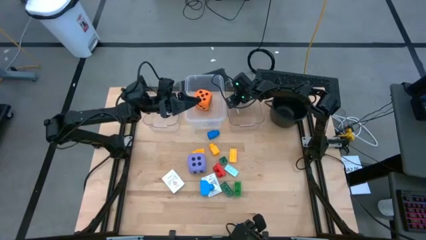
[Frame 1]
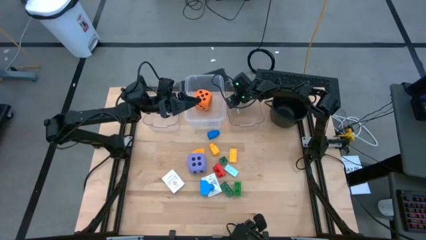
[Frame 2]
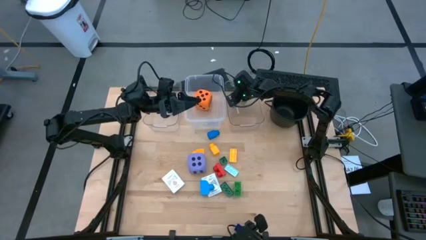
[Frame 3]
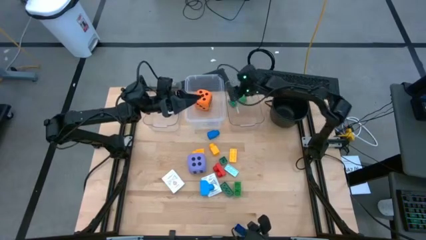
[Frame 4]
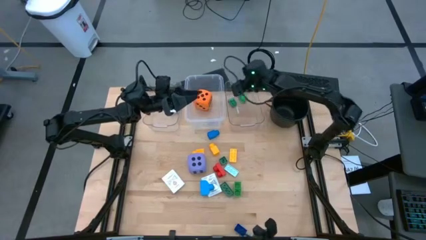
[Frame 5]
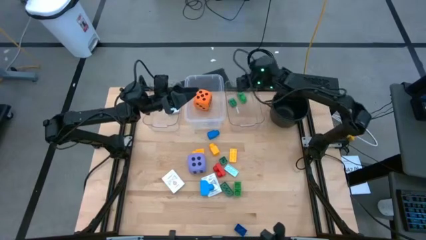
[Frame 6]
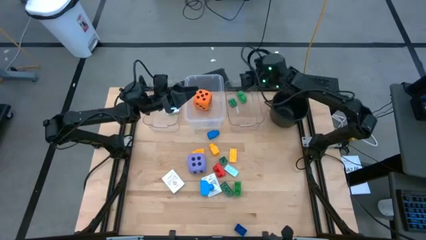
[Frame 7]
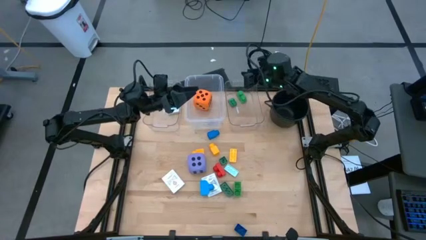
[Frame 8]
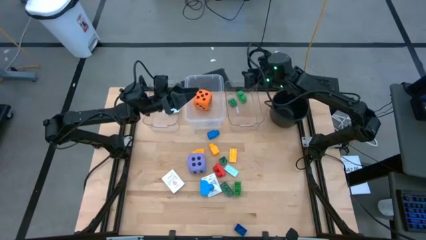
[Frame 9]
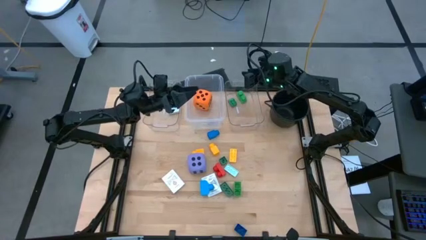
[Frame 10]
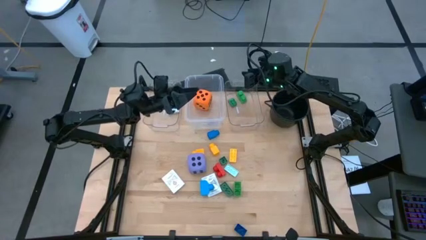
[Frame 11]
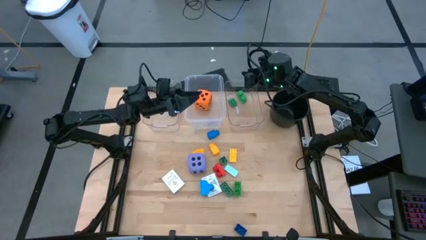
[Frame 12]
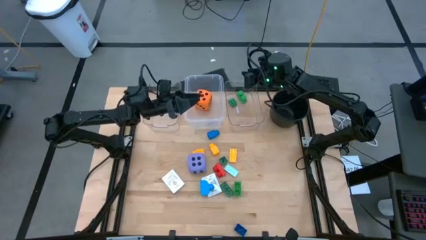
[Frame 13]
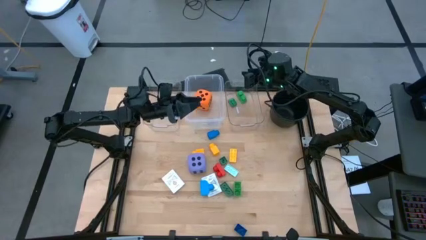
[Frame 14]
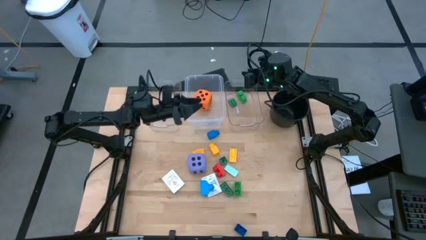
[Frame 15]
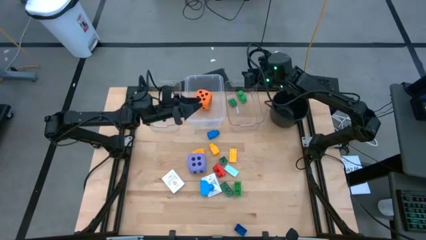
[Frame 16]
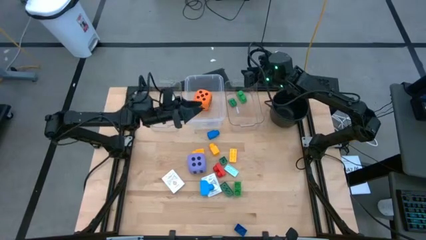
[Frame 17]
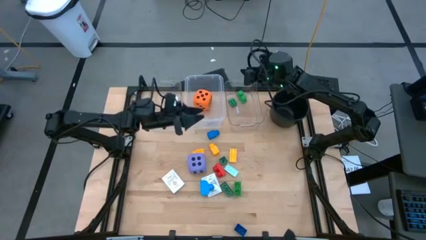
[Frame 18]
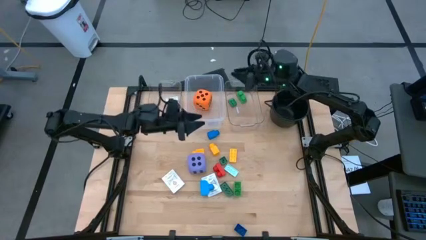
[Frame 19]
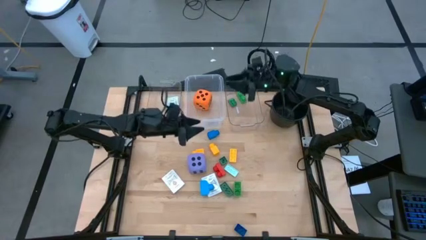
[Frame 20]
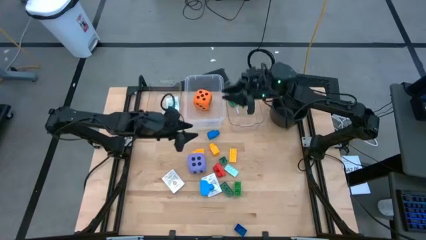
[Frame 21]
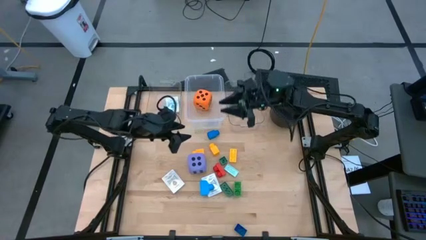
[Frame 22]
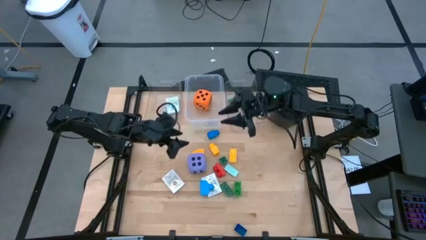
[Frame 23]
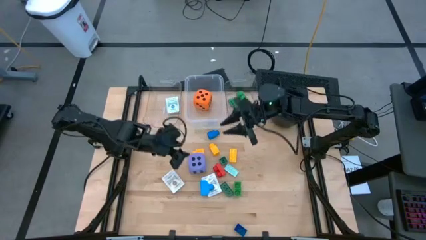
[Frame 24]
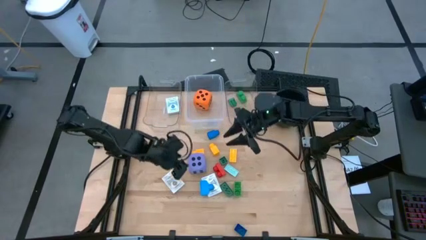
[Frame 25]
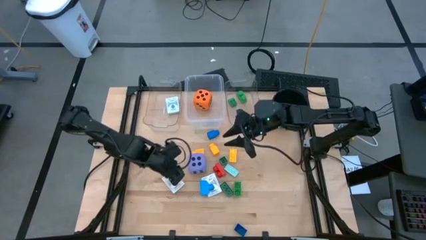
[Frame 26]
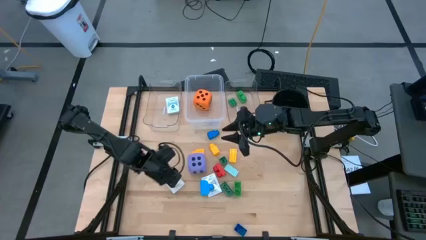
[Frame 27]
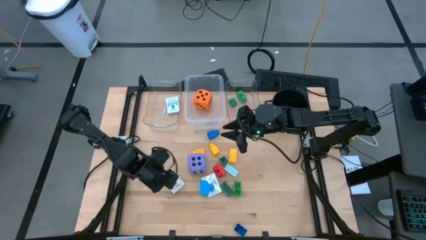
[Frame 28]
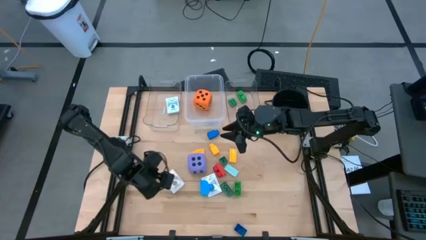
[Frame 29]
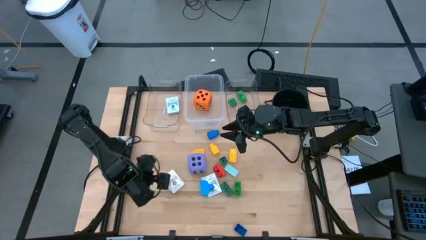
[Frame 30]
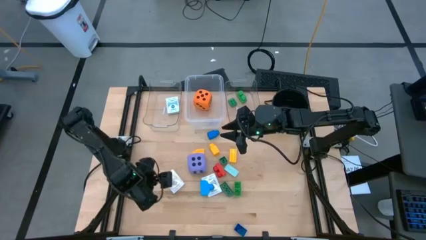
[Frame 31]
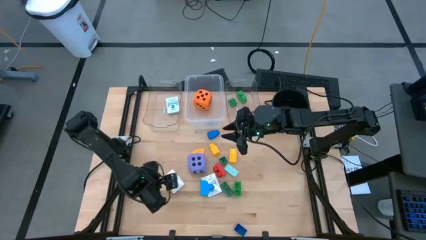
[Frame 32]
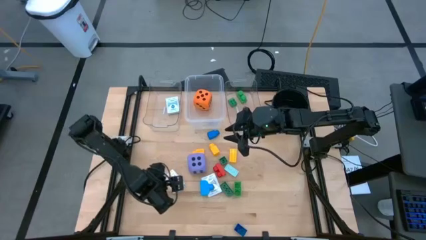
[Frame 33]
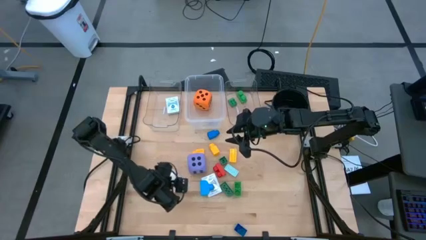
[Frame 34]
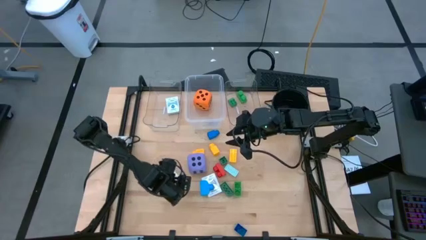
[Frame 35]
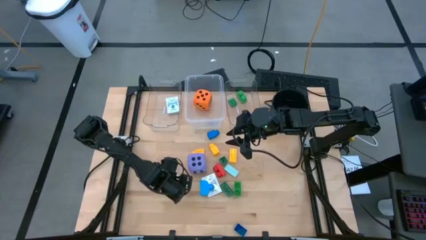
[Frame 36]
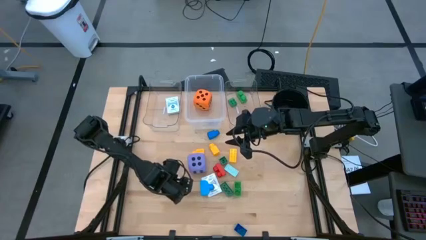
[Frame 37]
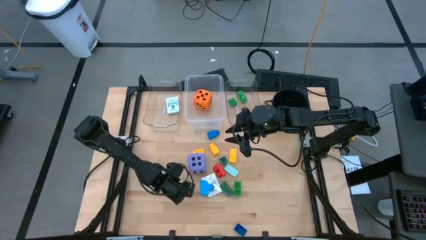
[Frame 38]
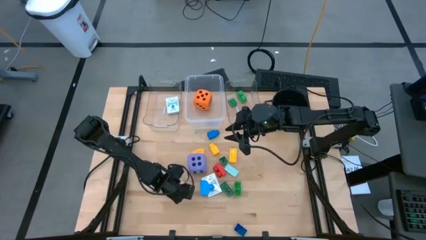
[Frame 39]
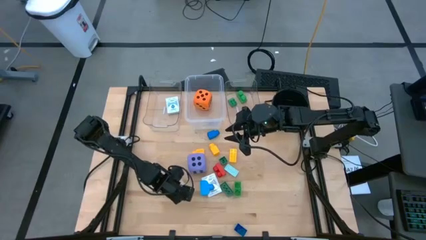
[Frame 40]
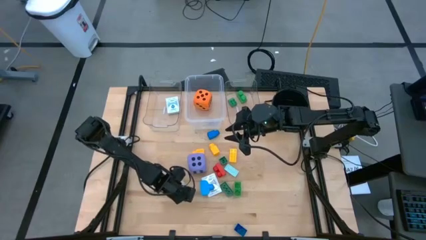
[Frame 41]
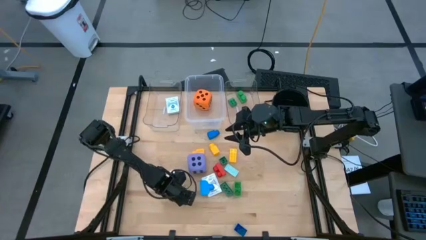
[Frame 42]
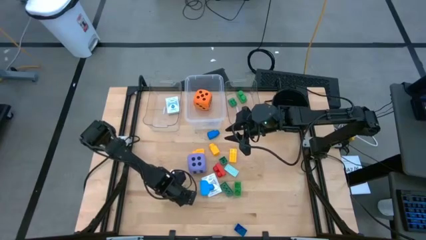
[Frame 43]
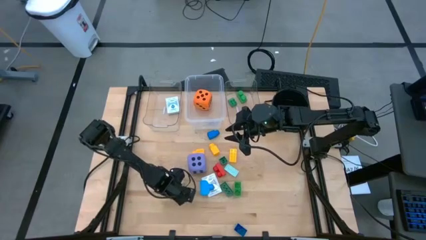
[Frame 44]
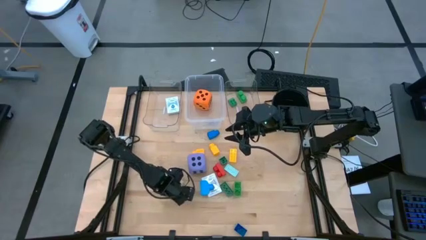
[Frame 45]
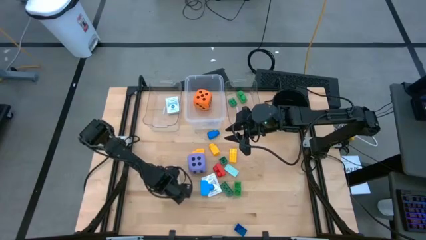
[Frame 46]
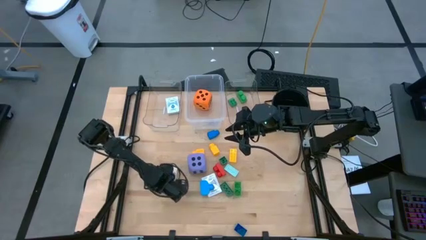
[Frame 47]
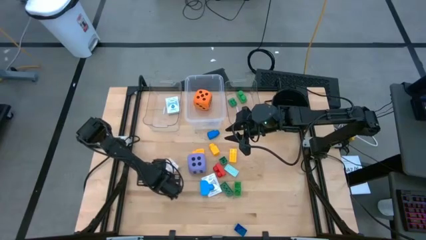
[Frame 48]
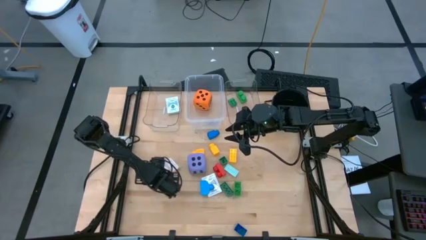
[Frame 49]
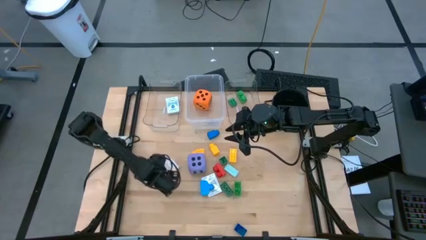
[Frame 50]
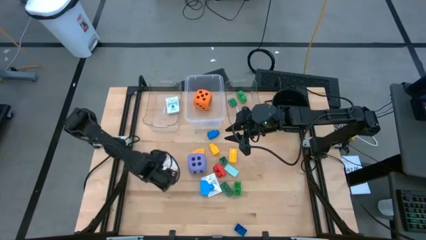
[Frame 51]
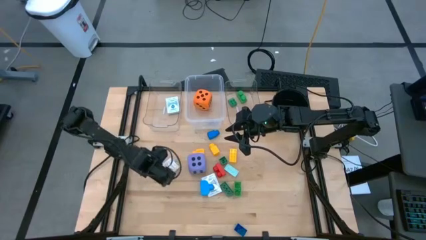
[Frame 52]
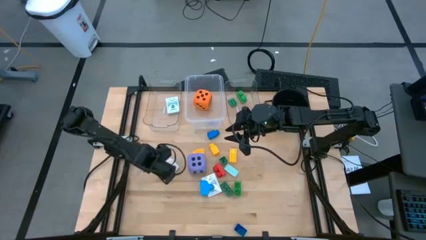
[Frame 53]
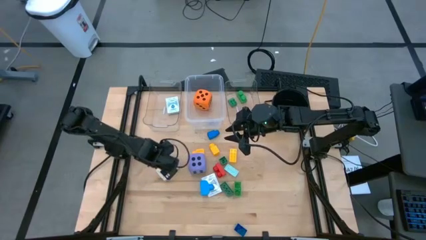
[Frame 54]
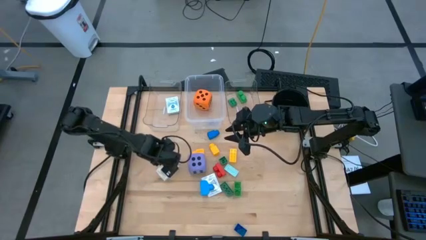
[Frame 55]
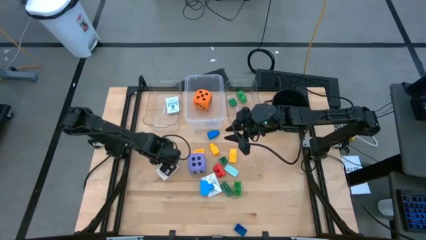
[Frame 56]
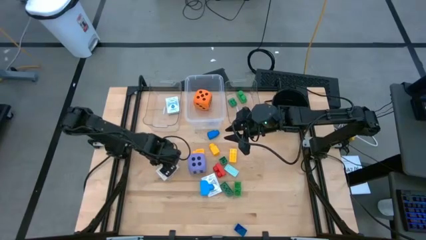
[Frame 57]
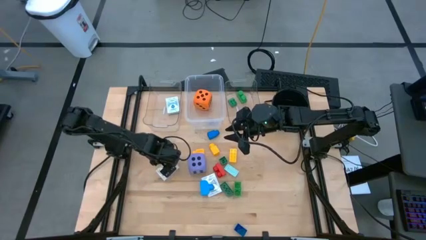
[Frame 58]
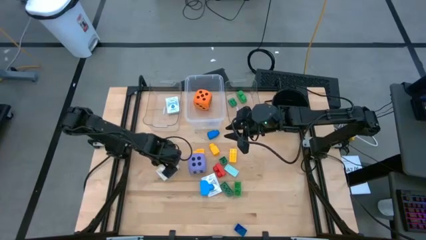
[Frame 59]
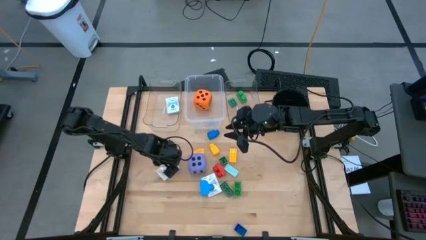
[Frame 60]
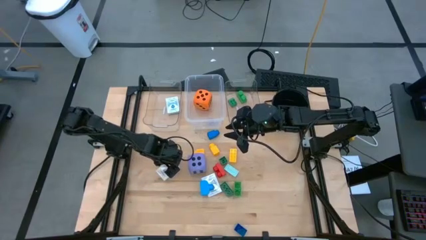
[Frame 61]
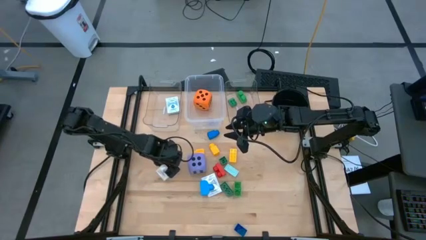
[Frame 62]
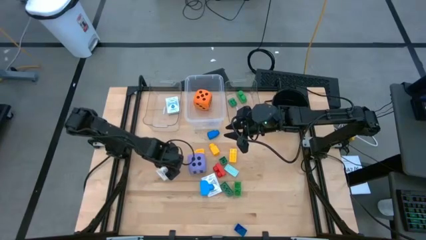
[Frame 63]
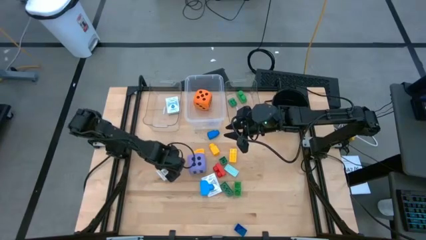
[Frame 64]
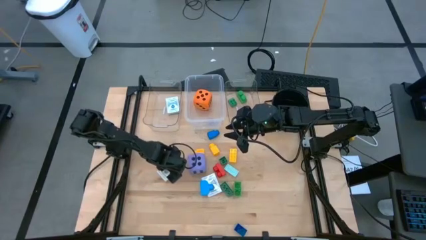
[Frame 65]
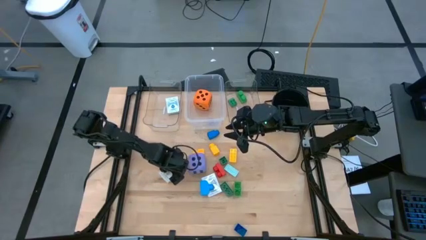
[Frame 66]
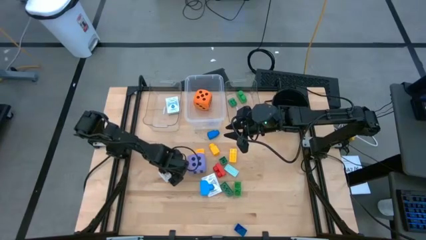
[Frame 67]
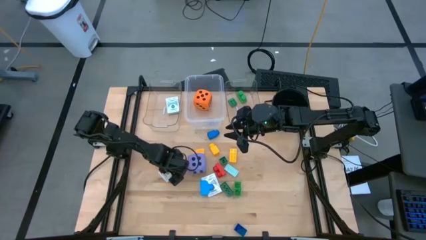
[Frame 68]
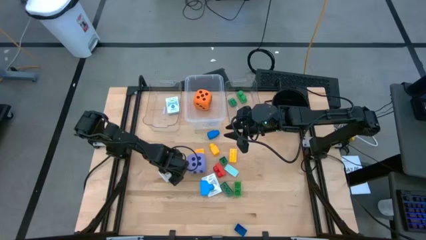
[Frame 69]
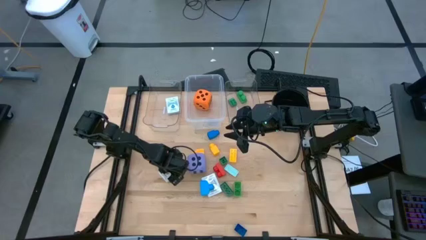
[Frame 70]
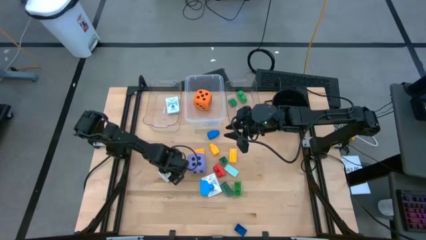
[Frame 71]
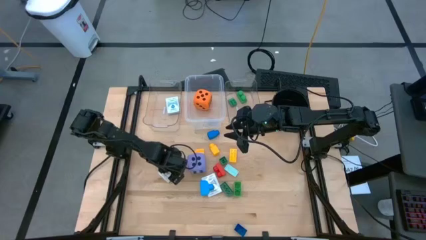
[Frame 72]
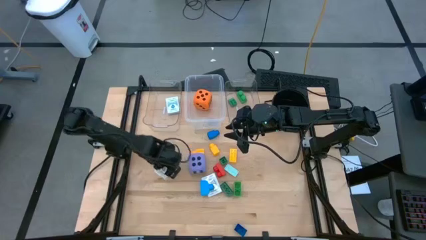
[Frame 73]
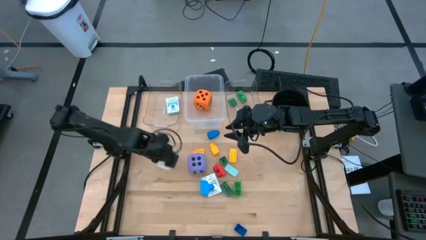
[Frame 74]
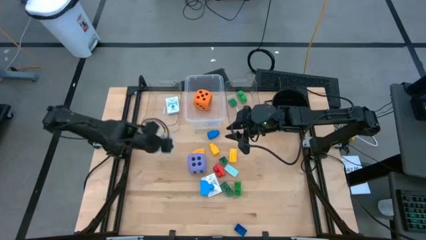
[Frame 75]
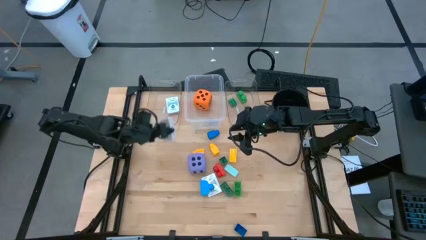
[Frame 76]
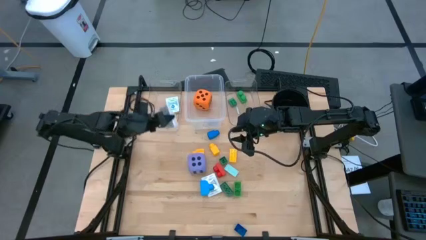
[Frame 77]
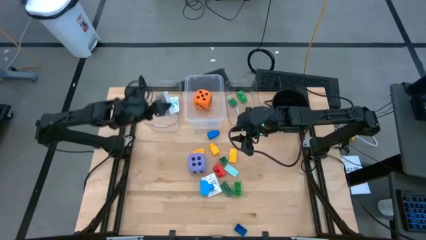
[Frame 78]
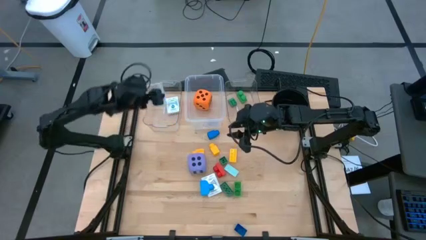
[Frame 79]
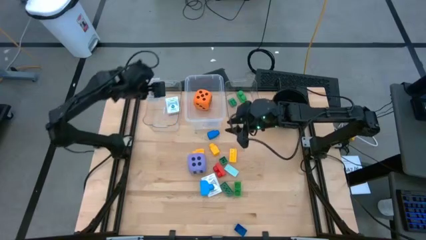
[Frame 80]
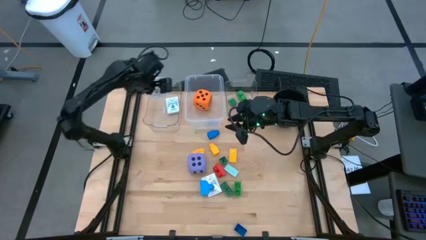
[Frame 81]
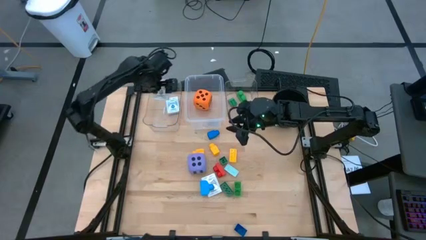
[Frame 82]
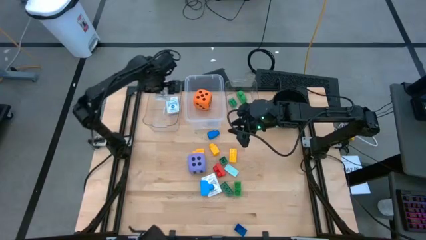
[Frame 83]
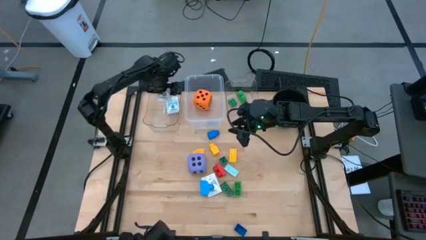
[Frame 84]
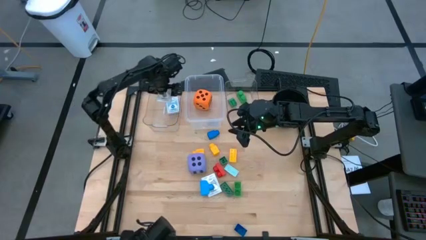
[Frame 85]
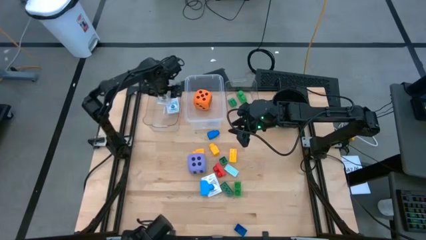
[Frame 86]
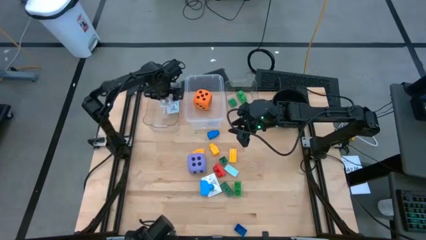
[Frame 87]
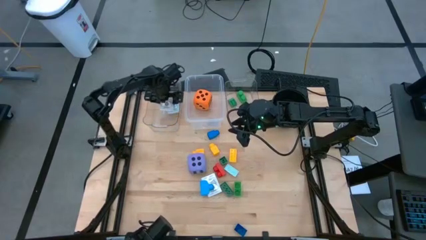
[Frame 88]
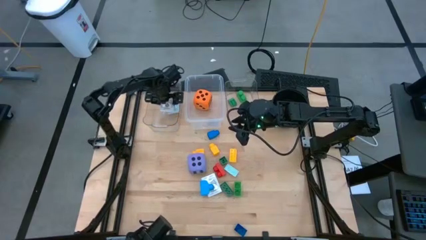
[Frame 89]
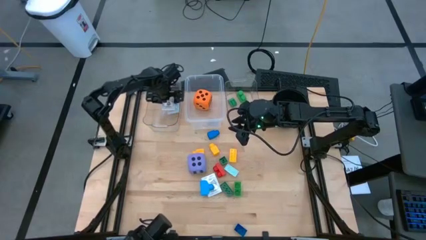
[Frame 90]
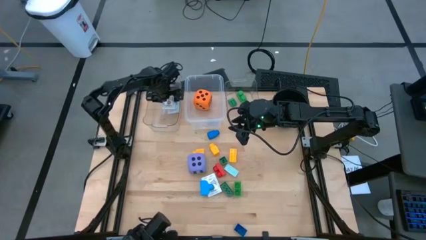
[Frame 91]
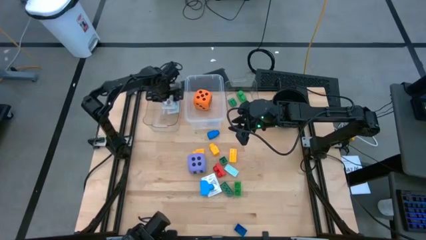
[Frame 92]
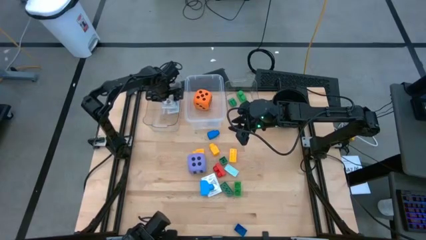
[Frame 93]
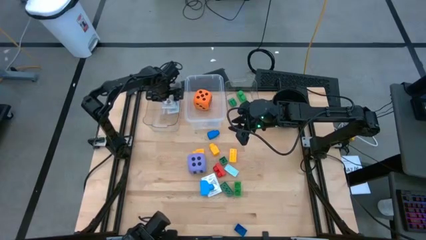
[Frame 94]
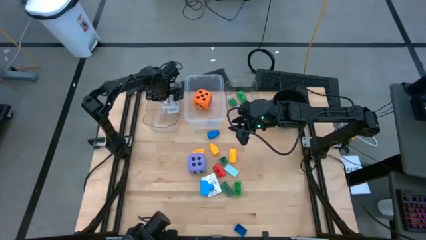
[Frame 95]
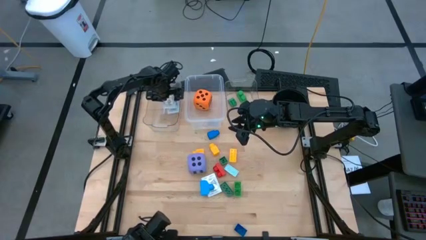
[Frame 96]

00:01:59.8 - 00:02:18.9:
Task: Pick & Place Toys
Put the brown deck of cards into the left transparent bin
